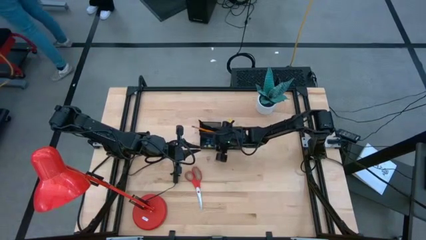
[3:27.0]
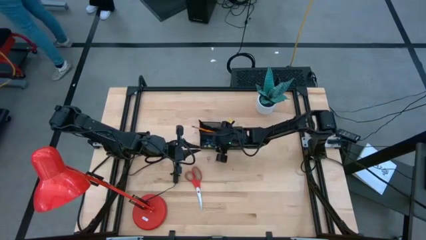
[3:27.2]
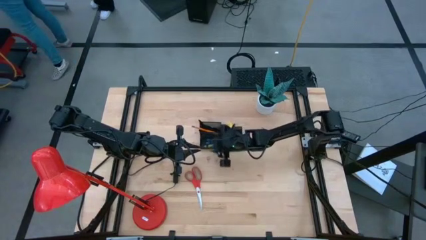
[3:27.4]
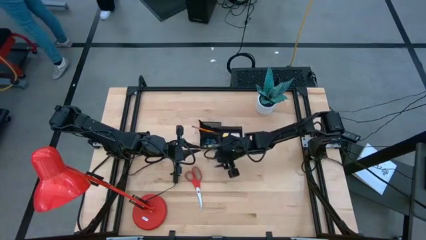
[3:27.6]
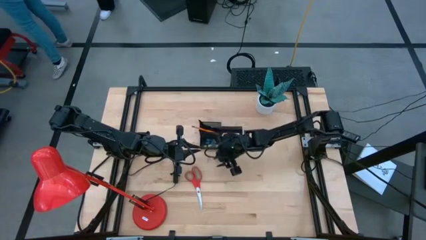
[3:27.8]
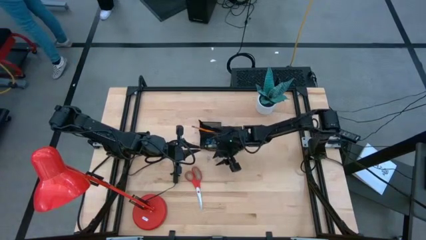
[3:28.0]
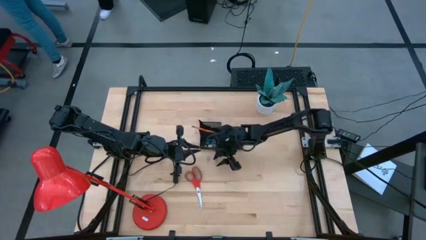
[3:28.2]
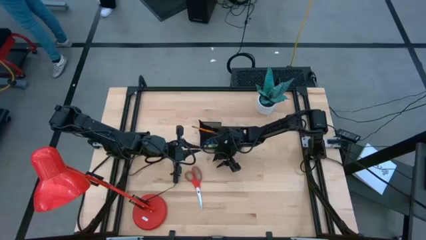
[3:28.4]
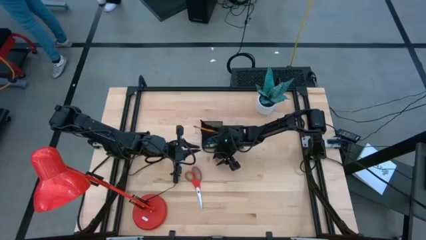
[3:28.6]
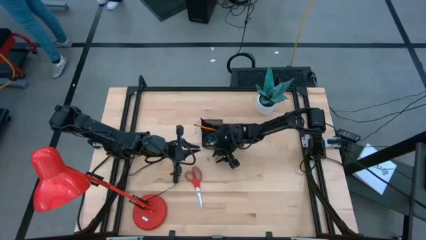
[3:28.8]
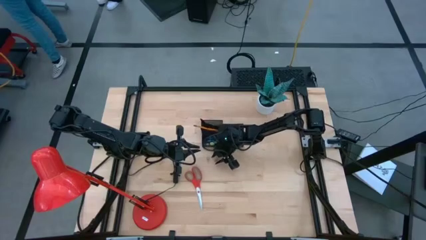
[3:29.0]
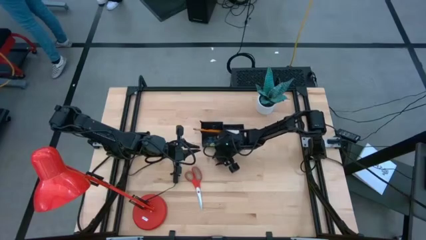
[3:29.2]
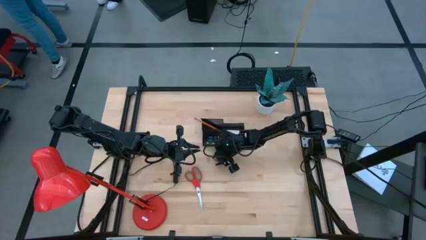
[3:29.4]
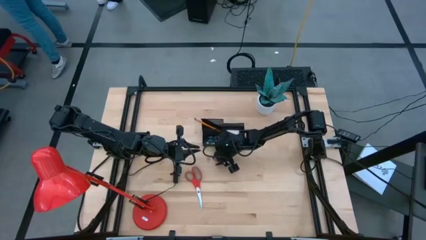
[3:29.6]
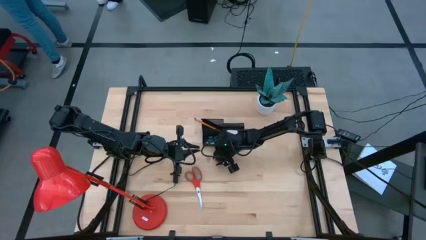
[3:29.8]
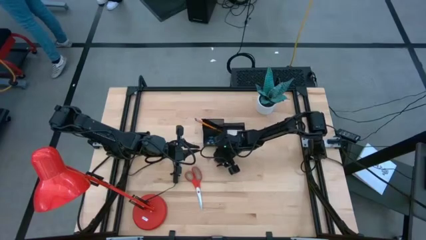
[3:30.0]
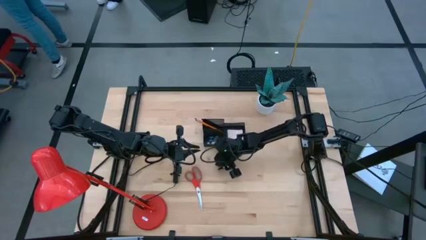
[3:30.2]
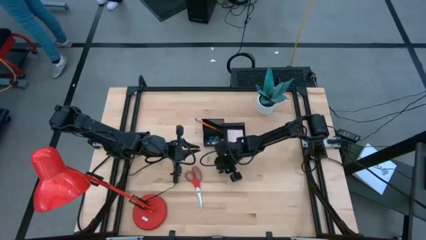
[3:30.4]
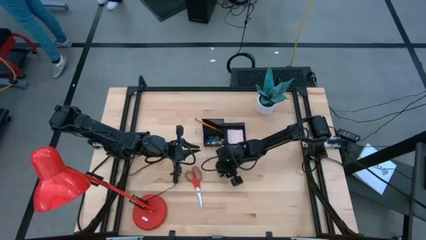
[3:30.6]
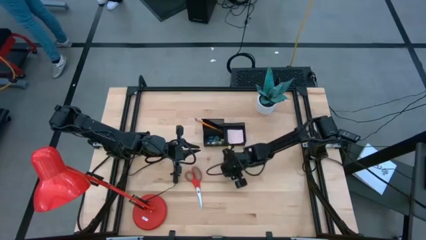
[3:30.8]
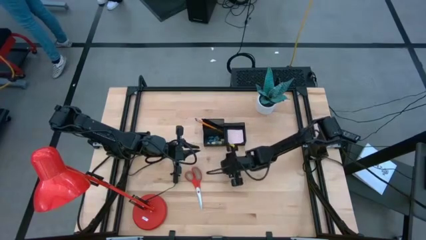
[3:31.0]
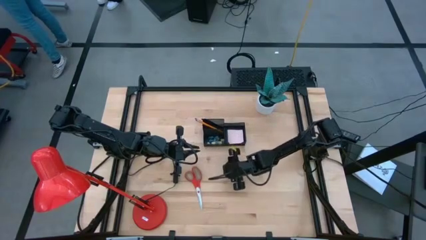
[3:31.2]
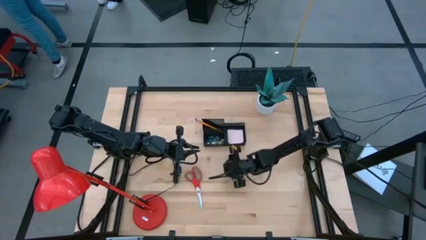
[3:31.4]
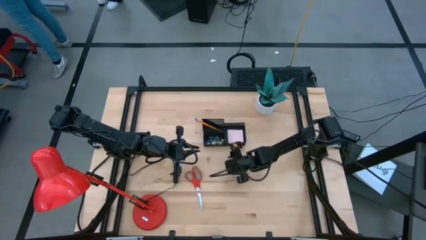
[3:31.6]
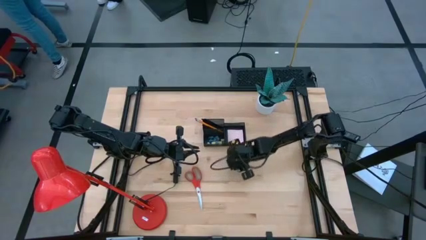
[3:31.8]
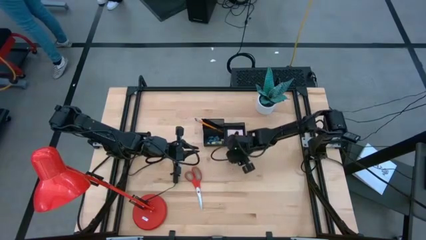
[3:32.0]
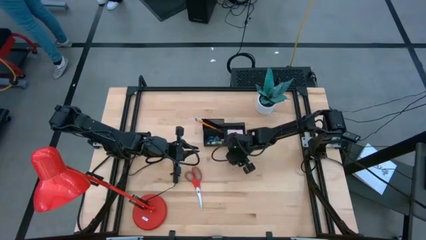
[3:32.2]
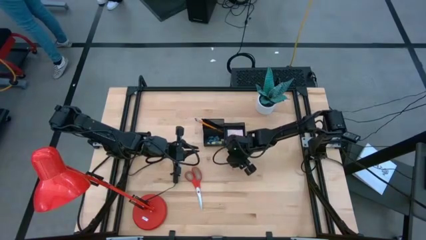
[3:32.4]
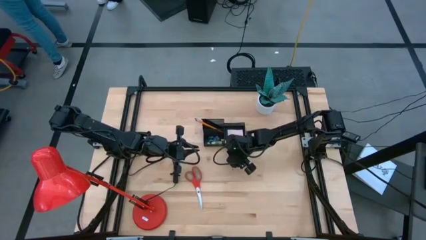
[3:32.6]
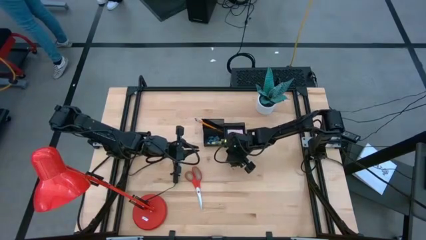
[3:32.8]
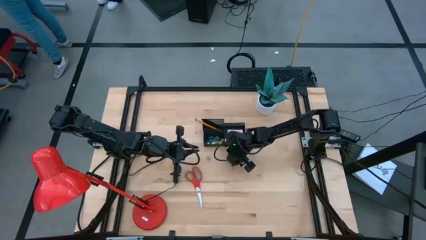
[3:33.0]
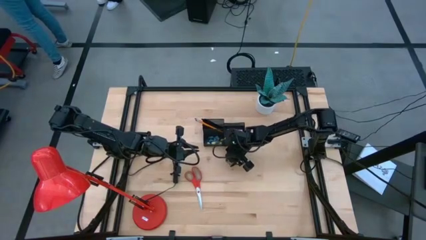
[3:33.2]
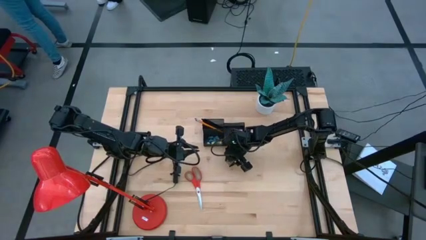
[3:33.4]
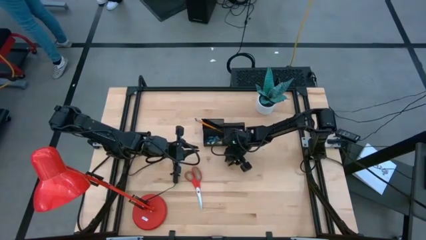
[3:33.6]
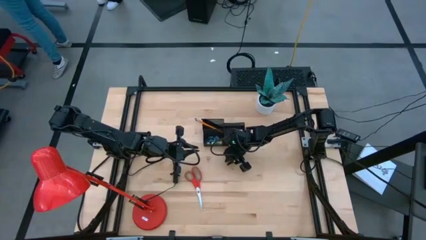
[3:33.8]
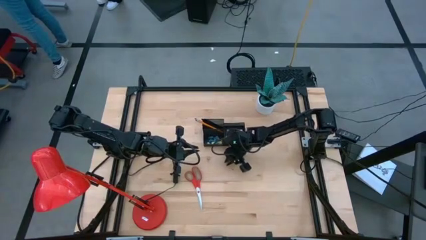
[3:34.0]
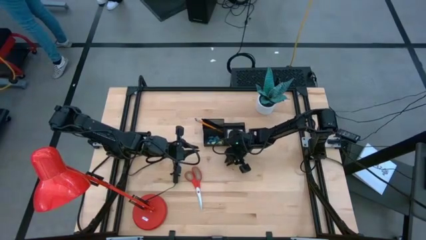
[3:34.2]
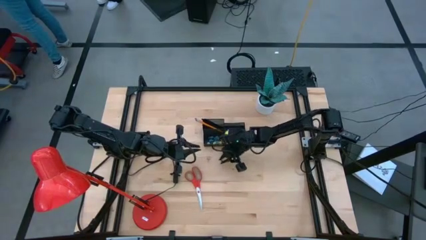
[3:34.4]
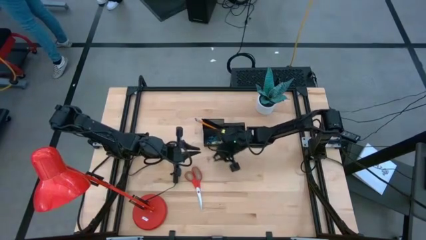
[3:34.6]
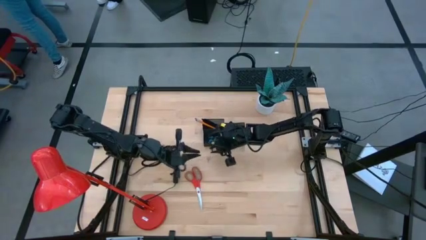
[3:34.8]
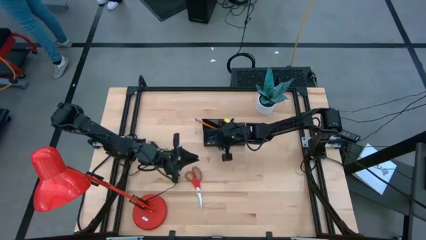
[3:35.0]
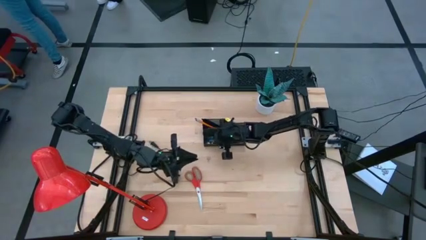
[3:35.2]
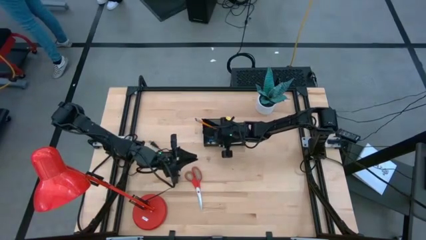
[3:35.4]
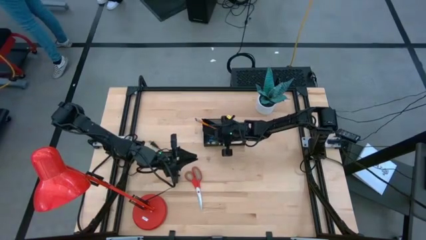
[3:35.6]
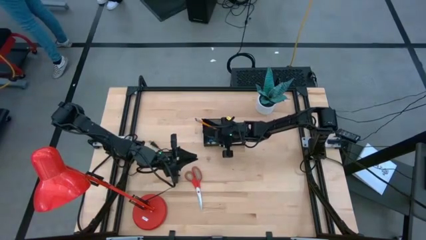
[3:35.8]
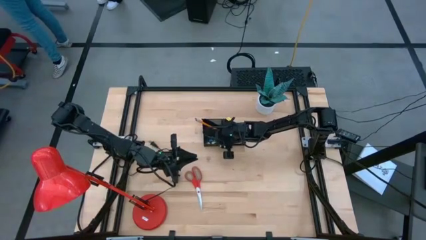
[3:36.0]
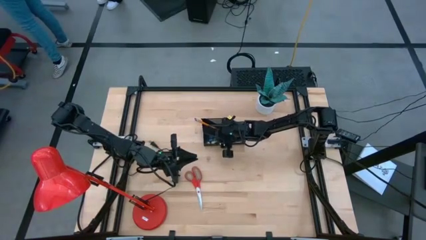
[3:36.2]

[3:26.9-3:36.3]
Task: Pick and place office supplies into organizer
Put the pink binder clip into the black desk organizer

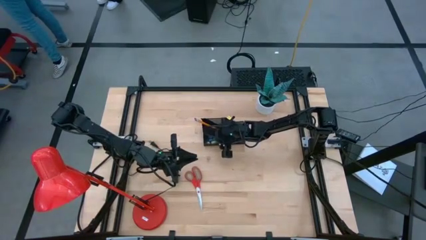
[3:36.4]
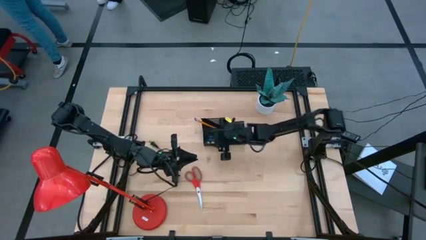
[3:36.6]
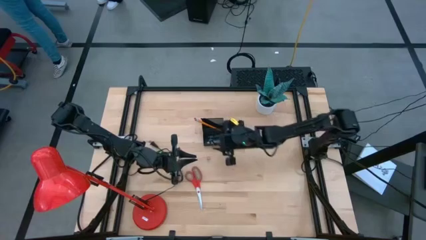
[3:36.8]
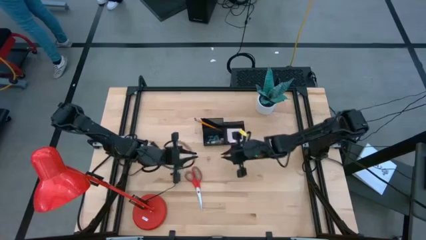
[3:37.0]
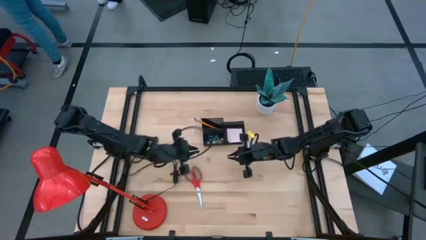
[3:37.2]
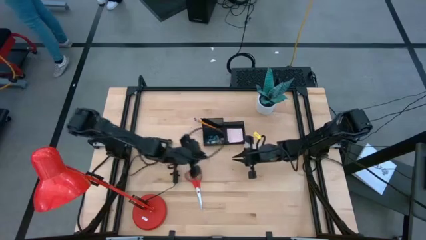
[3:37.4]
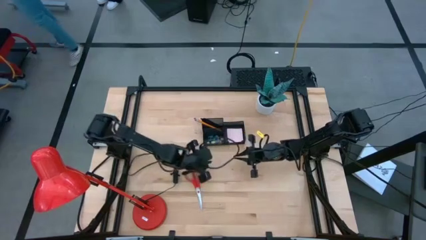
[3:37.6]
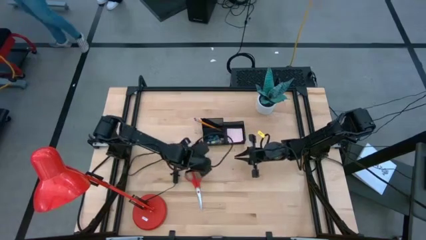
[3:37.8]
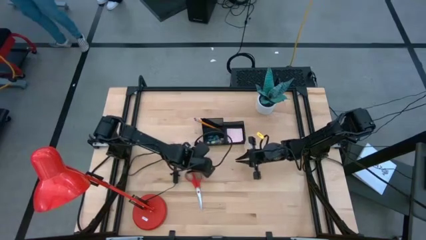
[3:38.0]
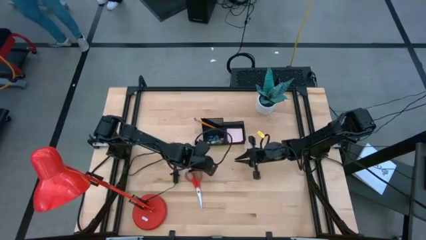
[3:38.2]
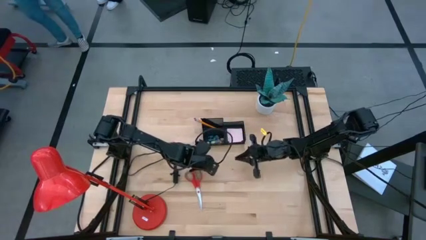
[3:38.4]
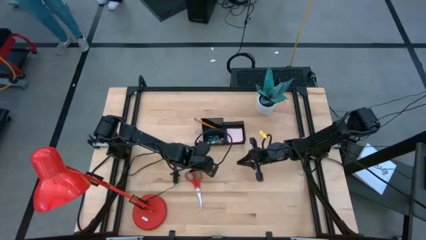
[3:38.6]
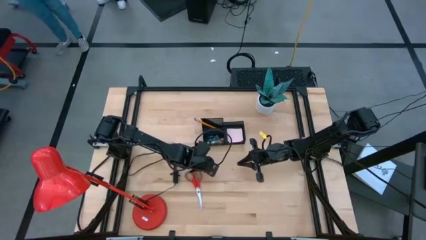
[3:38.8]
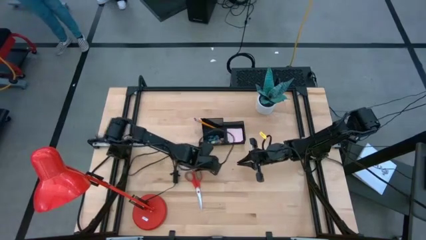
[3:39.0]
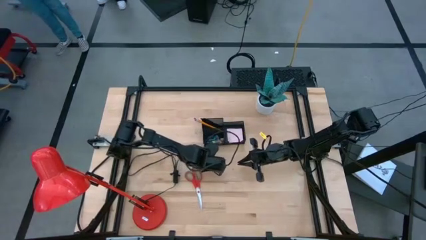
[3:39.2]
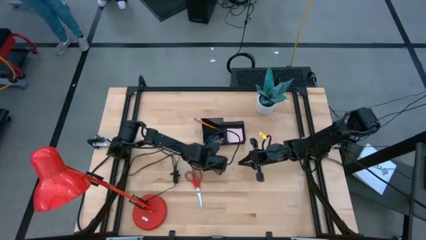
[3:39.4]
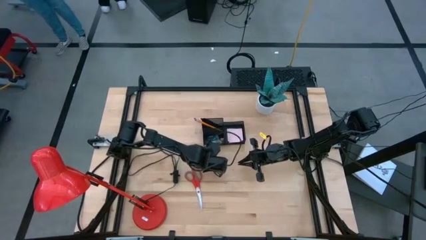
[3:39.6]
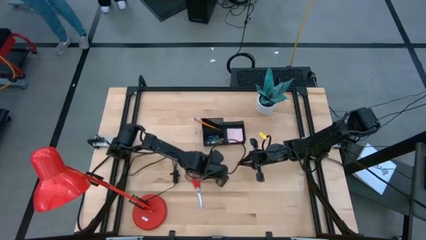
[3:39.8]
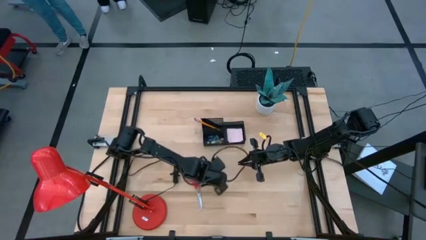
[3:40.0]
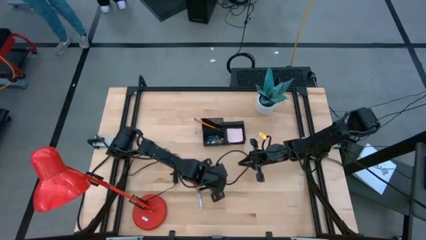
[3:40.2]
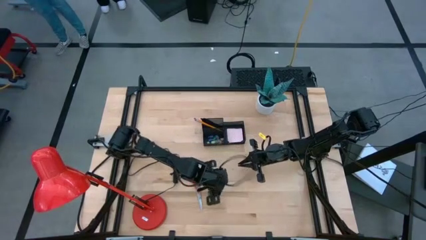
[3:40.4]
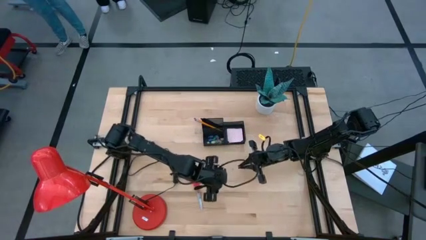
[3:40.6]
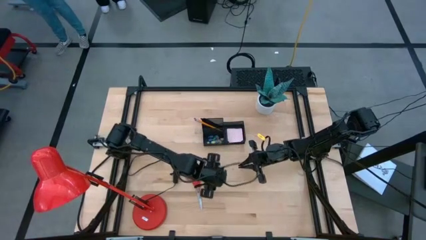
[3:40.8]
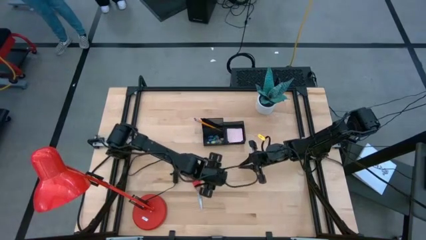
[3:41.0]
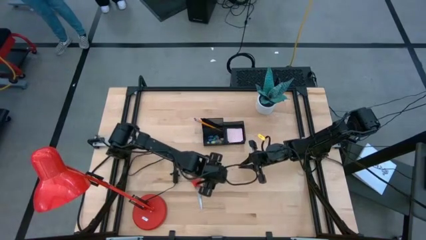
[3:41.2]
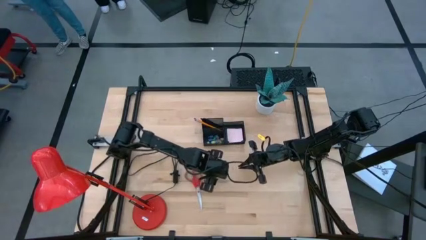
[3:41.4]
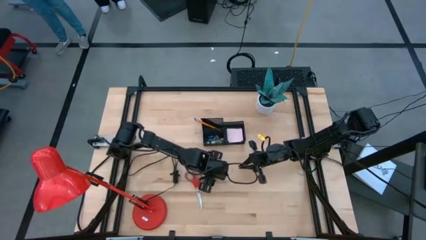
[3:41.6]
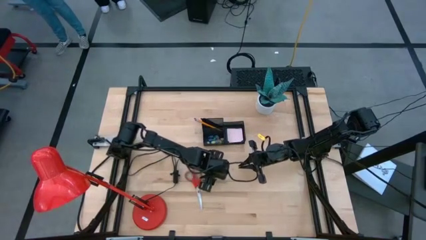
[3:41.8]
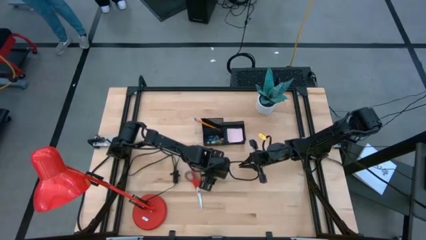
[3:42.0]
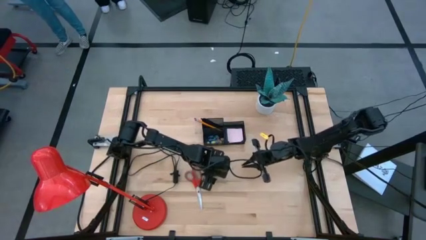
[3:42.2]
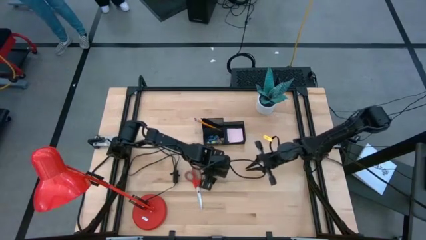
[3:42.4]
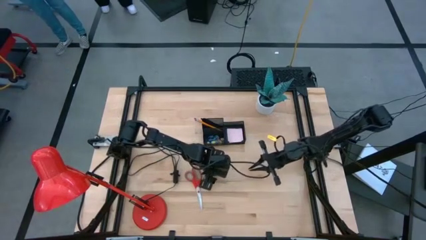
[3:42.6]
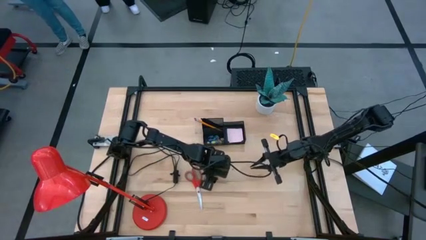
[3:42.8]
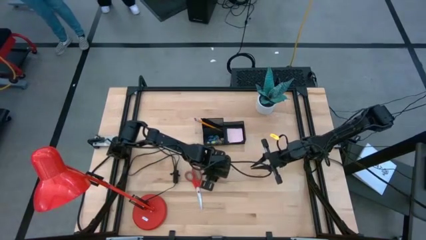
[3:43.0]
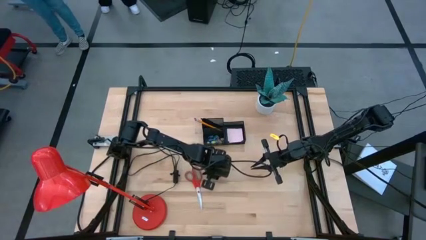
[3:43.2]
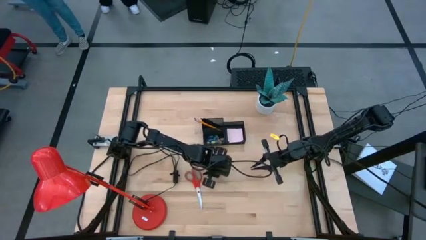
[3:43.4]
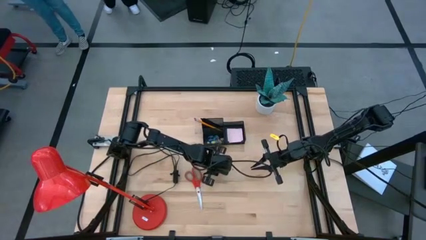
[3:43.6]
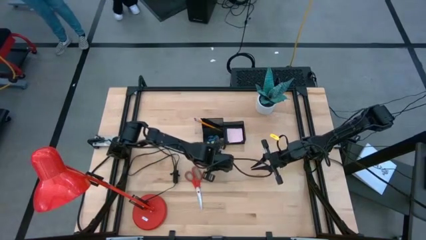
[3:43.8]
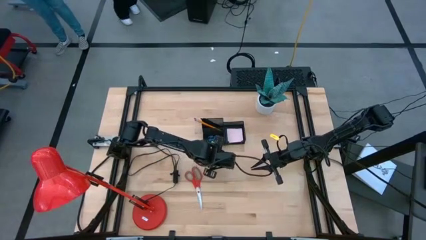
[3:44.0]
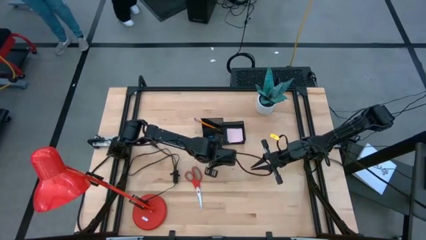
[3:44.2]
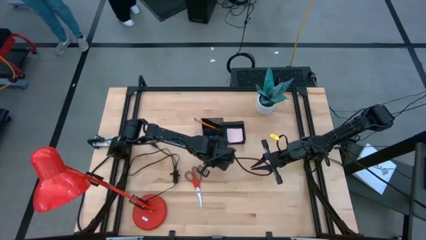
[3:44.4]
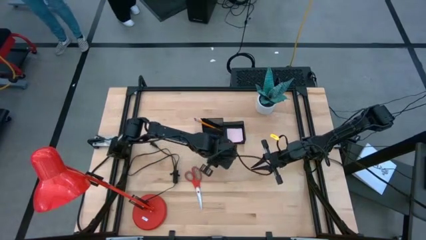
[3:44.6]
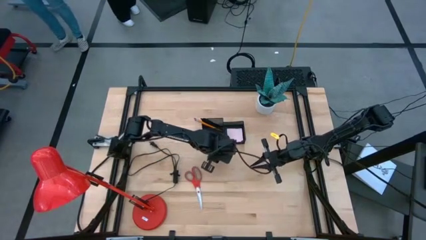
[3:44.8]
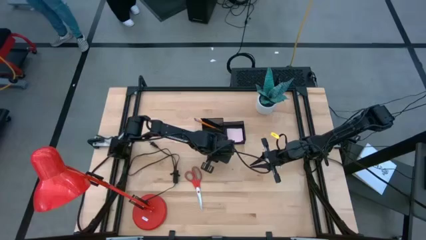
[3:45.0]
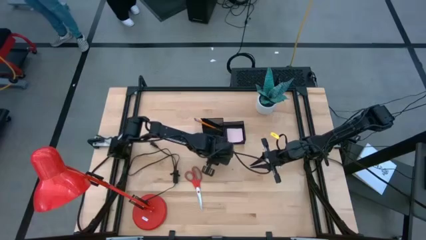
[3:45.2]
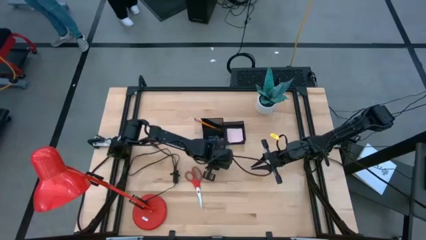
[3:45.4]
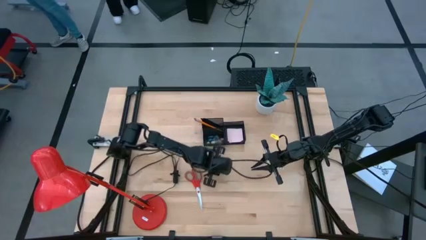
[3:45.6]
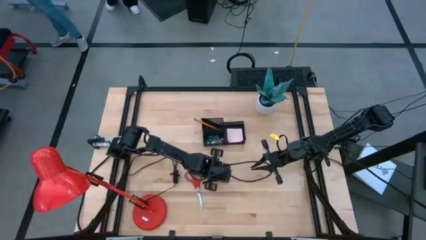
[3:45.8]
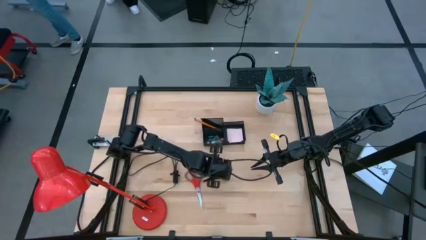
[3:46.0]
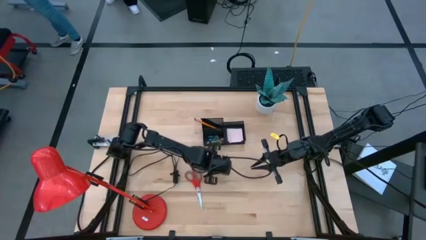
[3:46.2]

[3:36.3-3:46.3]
Put the pink binder clip into the black desk organizer
